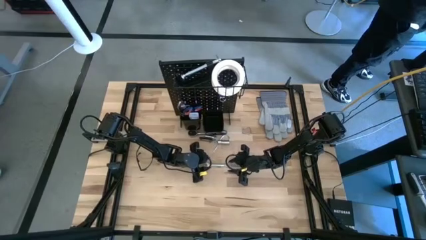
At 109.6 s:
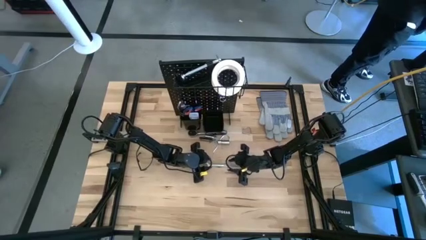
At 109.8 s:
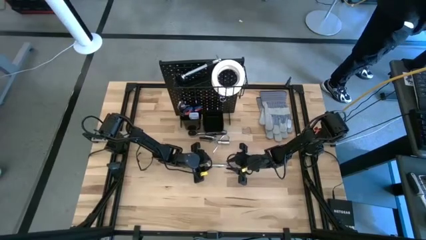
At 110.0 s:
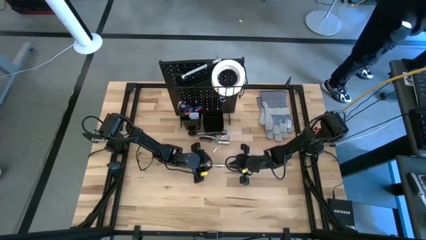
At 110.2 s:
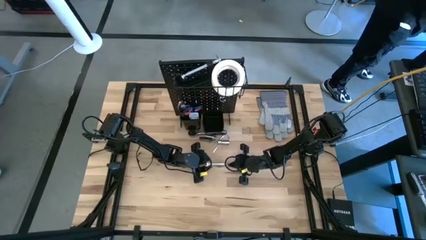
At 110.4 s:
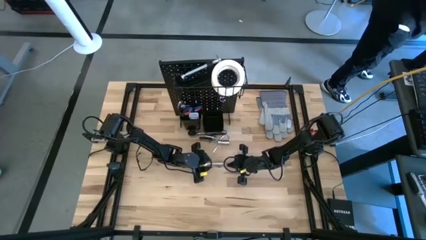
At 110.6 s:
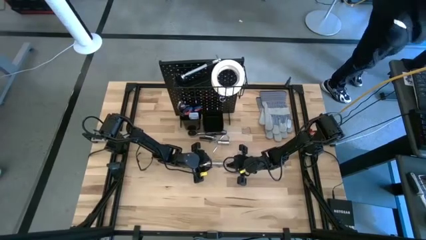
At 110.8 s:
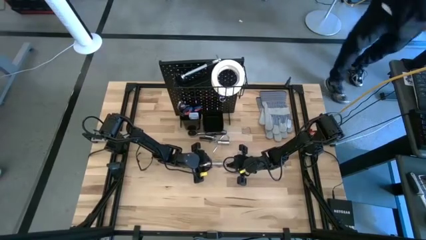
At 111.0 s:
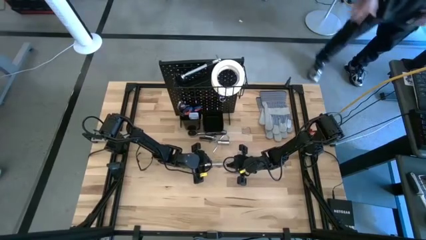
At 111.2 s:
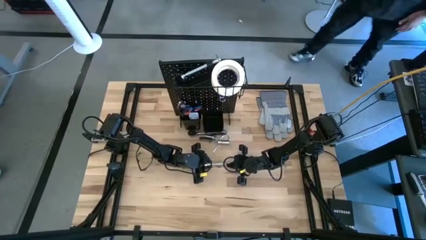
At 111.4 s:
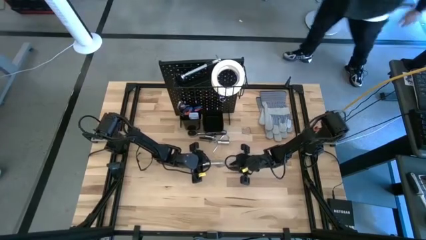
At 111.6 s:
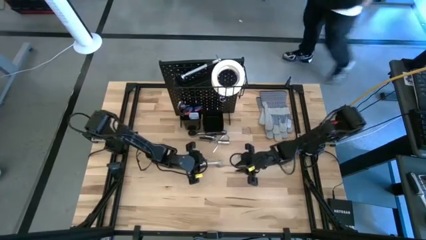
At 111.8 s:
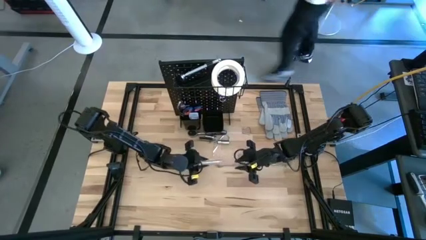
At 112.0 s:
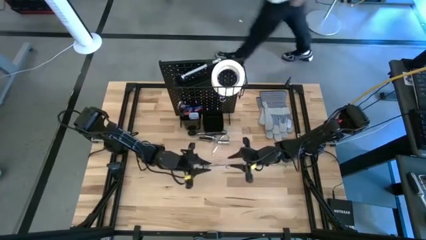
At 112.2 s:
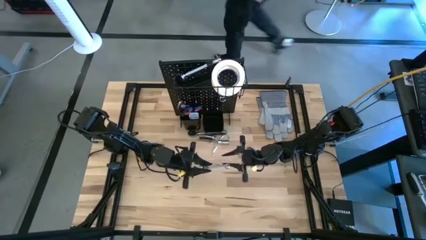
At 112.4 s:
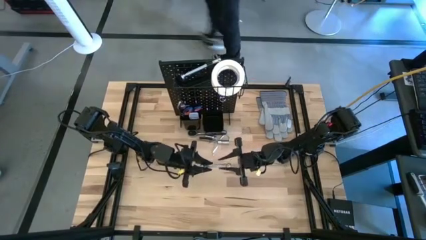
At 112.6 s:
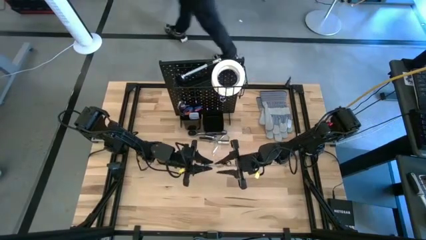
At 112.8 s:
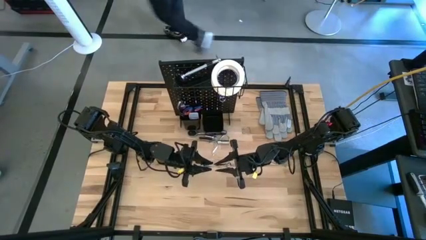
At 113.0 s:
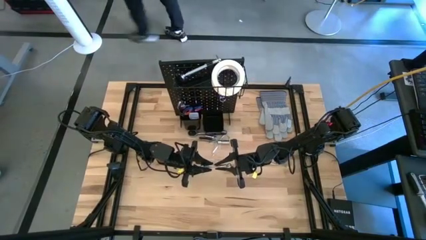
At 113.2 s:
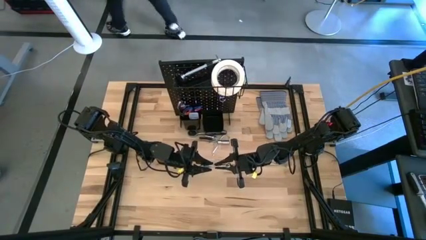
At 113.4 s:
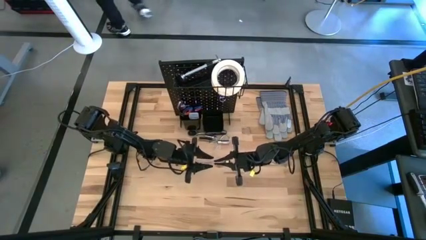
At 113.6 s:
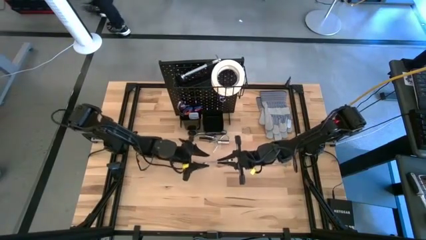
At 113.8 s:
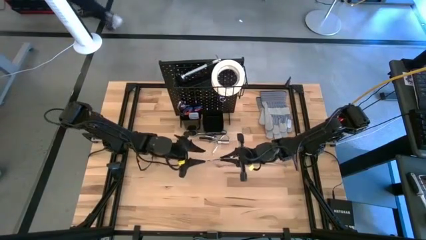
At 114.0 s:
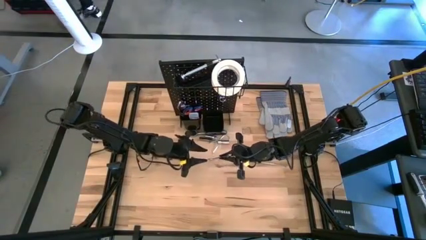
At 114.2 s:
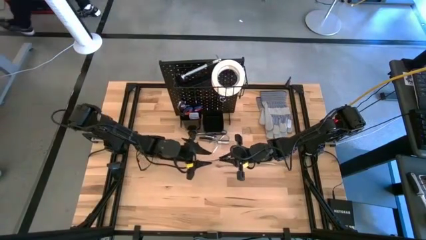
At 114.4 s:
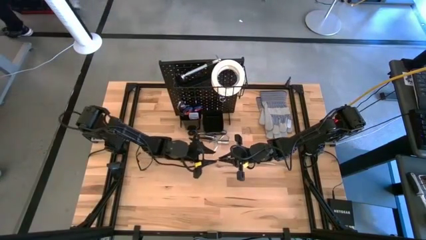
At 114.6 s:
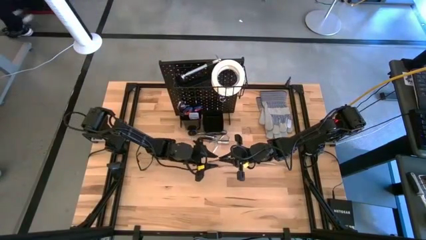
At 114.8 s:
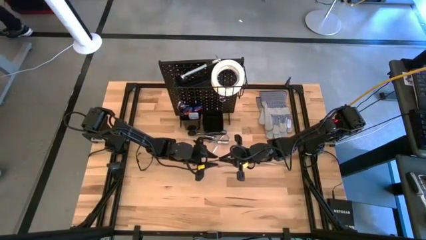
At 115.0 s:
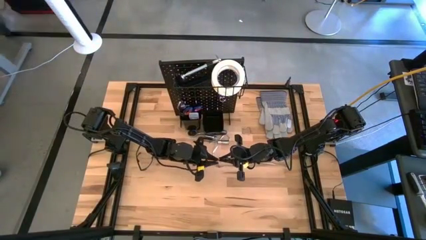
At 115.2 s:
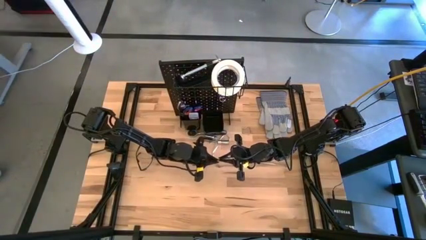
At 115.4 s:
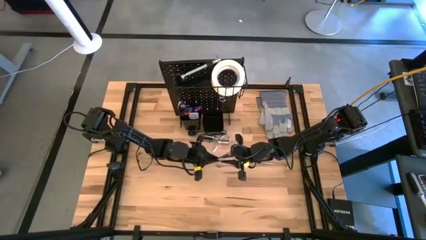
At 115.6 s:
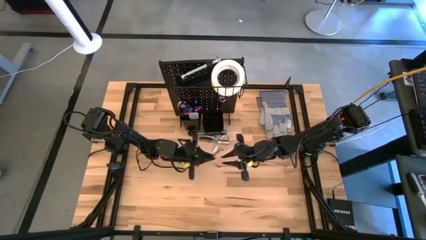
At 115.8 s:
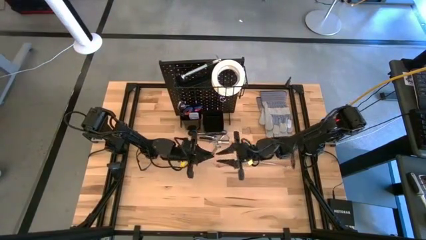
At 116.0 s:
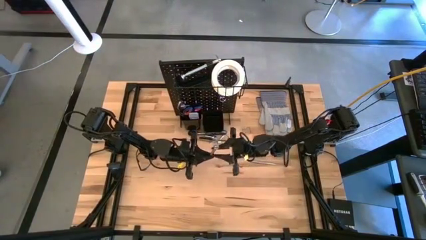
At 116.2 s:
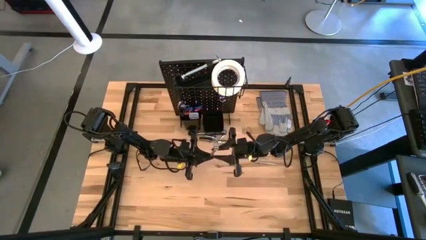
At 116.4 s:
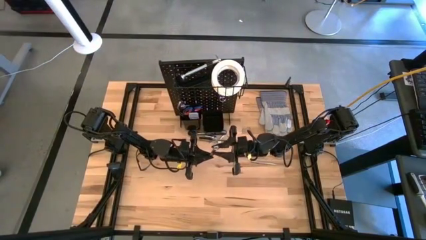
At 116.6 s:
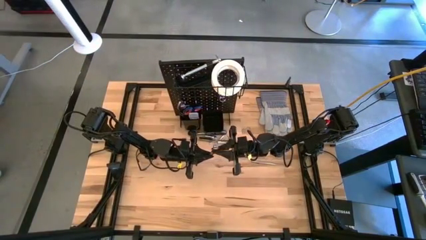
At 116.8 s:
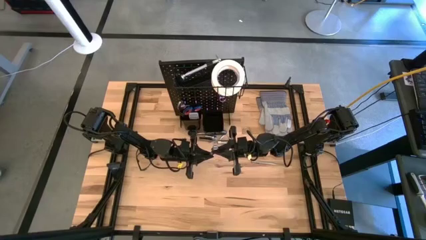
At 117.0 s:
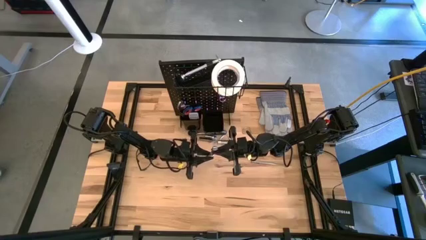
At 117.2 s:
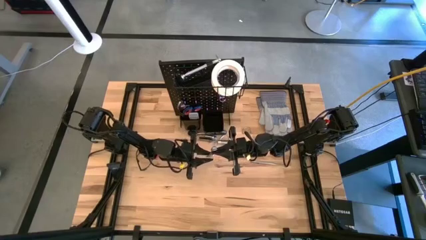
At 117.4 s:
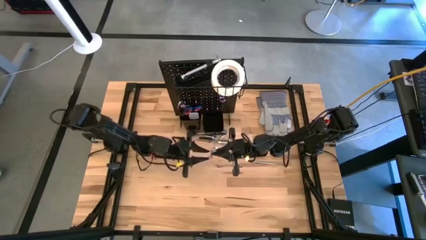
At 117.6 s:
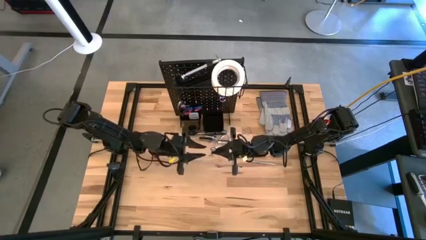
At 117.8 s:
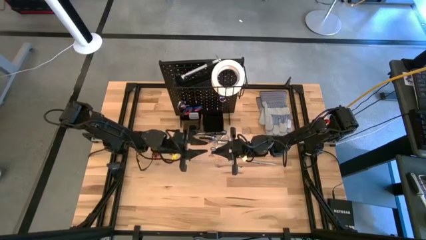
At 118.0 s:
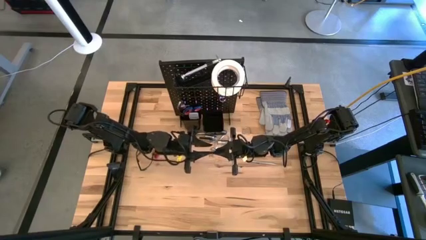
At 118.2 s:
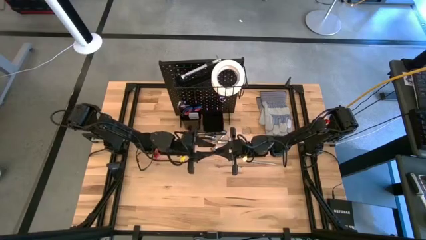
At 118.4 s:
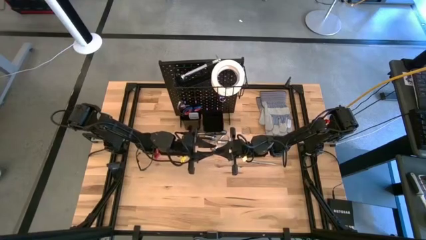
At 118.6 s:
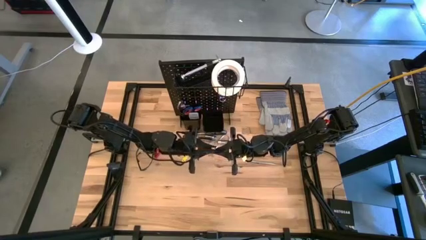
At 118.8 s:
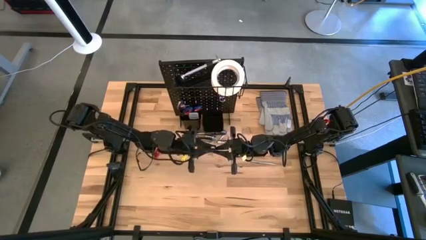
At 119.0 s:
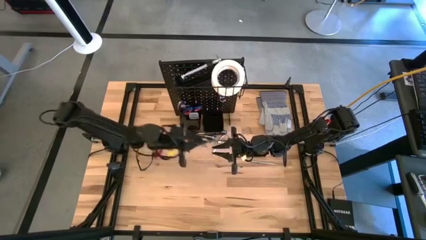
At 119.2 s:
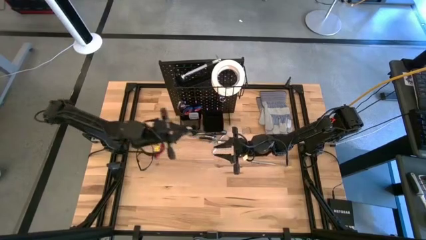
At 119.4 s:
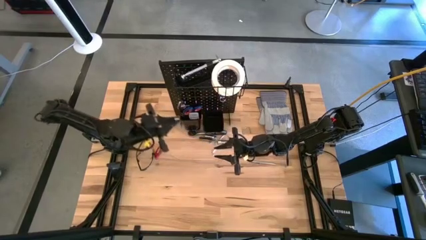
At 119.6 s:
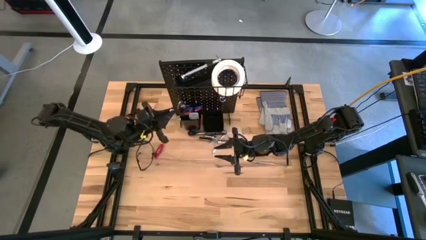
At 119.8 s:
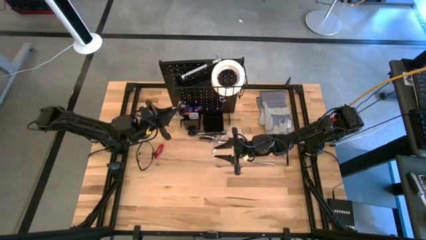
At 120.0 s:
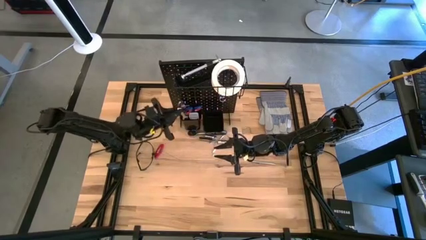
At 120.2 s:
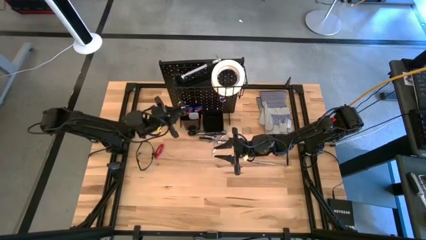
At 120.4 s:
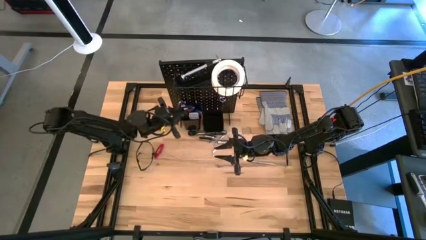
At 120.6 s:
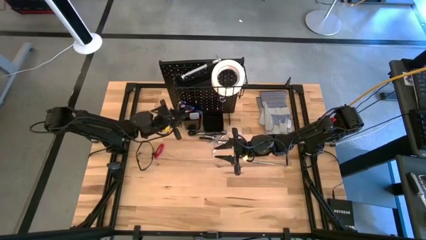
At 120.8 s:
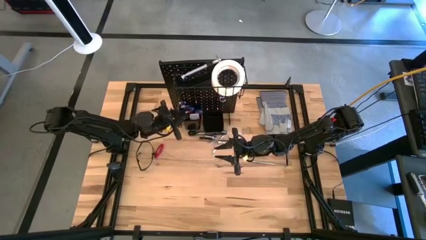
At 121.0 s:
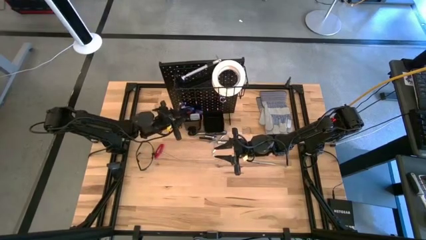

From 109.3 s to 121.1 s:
Task: Hang tools onto peg board
Put the wrench into the right bin on the pegboard

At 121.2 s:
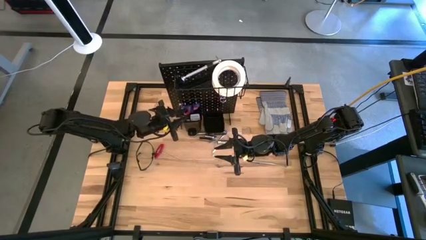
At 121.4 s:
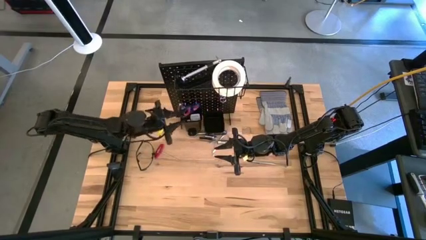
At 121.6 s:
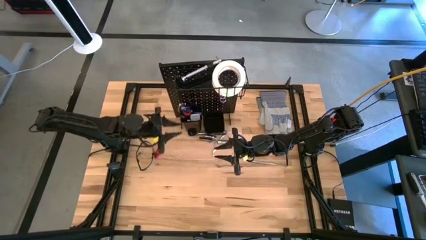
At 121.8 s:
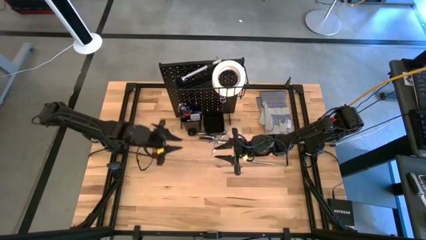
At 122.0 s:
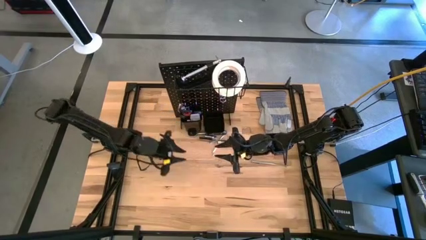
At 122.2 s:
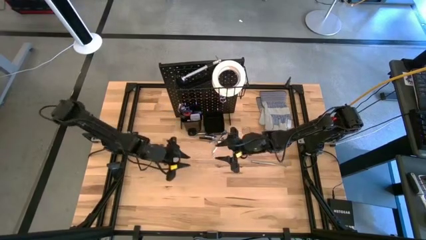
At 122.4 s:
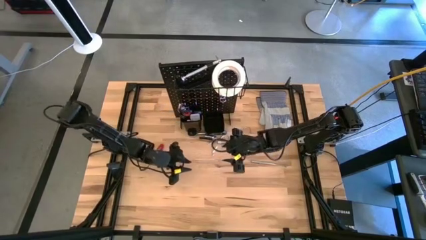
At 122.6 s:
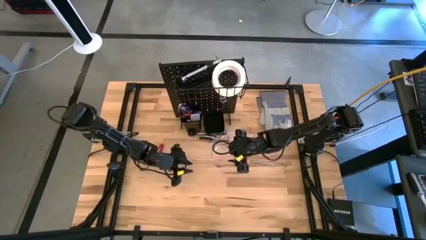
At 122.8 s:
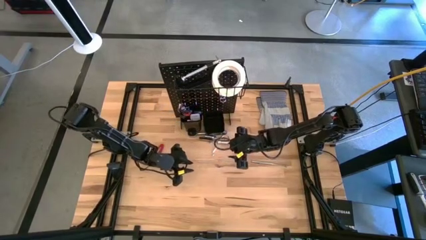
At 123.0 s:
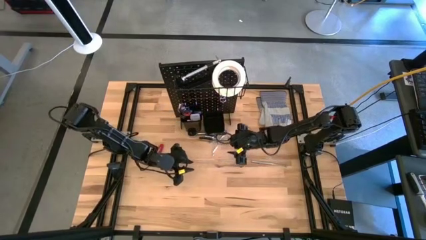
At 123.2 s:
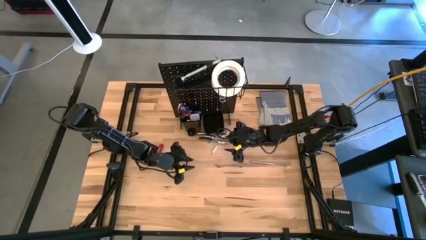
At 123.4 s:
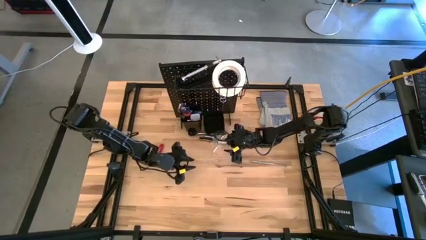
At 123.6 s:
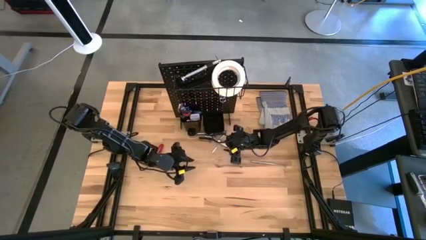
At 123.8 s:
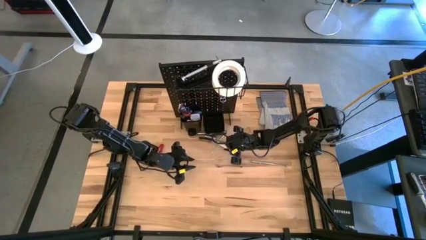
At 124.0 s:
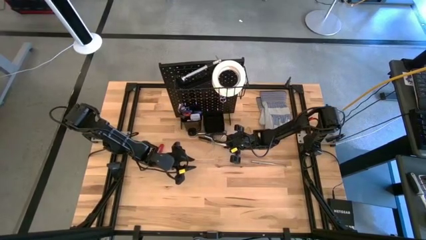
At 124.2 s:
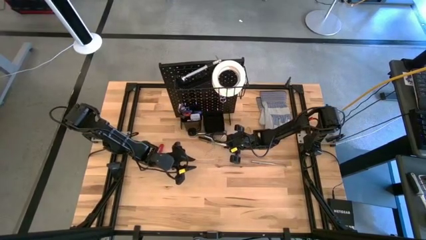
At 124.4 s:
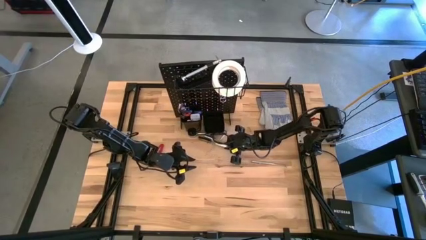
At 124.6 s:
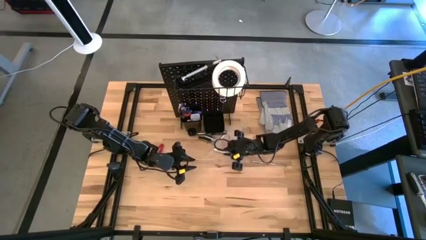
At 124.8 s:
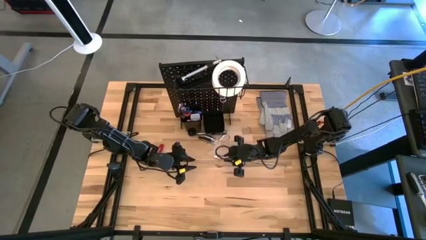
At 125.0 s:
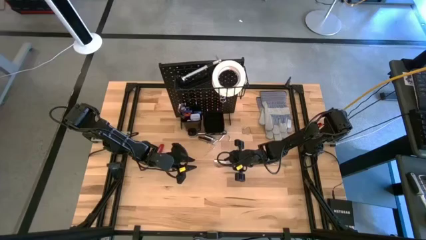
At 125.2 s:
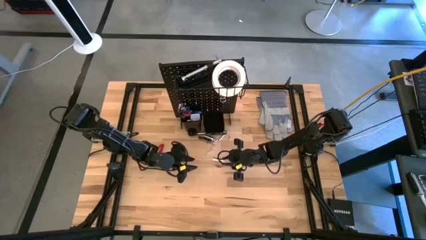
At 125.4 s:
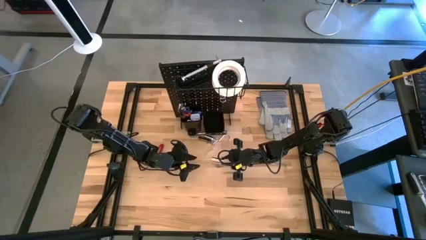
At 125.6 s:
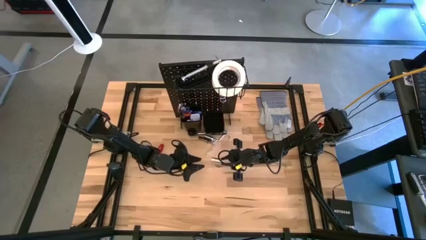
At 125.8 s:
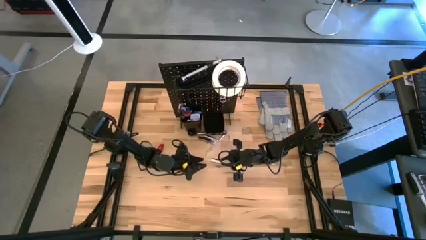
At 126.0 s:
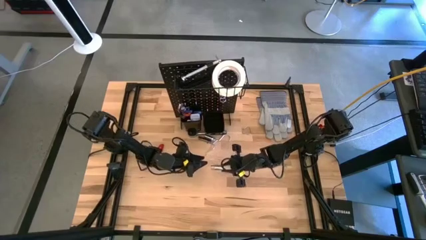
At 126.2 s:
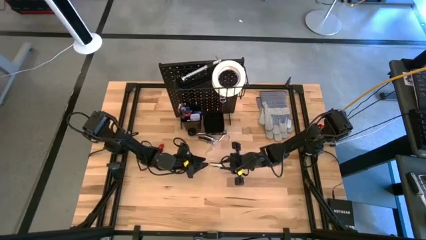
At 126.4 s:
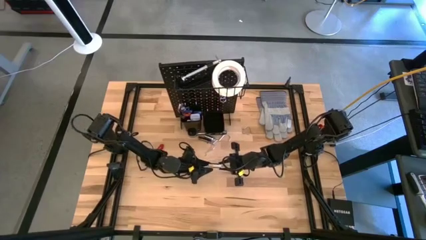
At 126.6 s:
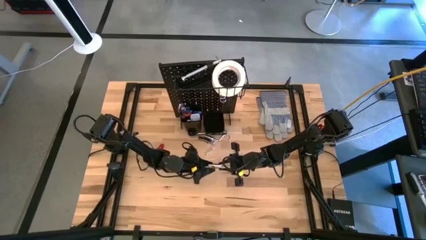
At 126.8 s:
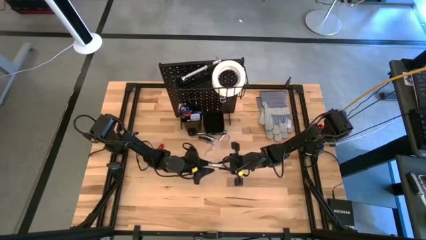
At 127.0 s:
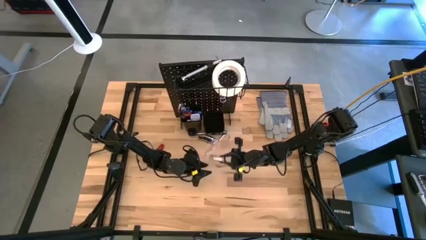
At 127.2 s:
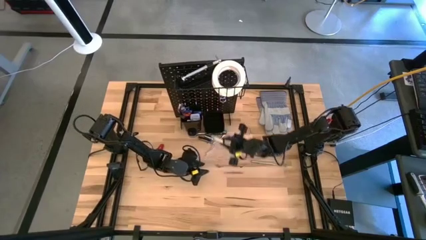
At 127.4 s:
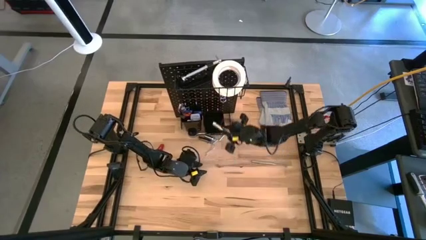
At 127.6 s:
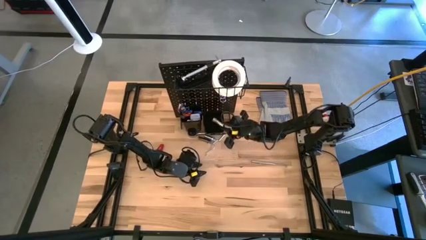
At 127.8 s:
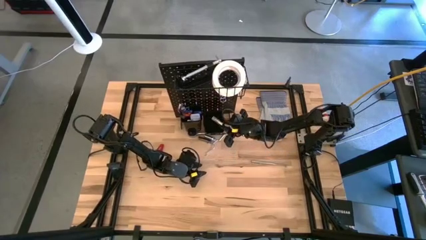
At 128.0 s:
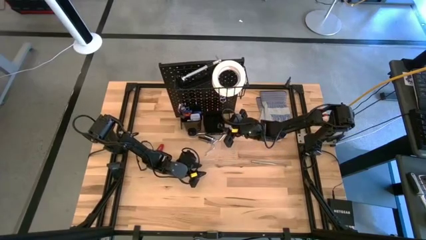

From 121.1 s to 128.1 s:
Put the socket into the right bin on the pegboard
